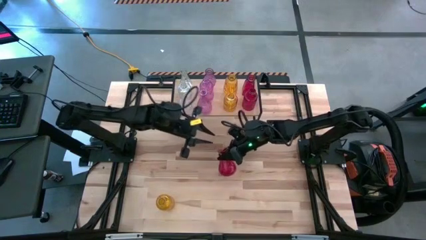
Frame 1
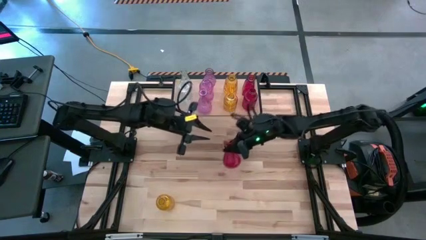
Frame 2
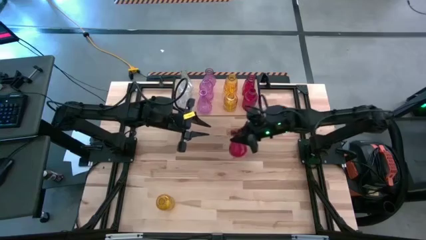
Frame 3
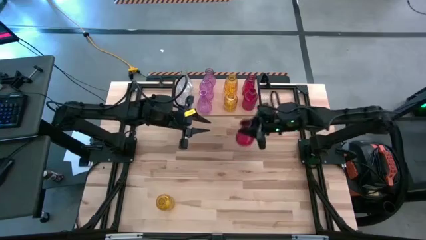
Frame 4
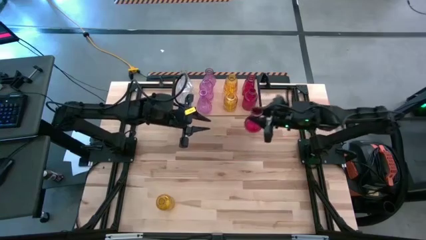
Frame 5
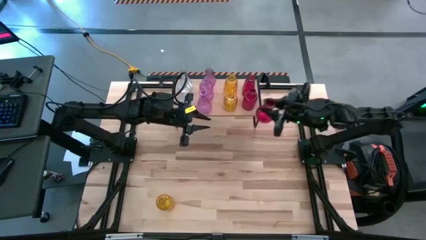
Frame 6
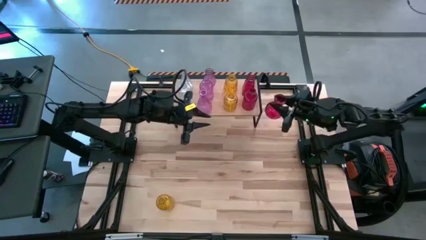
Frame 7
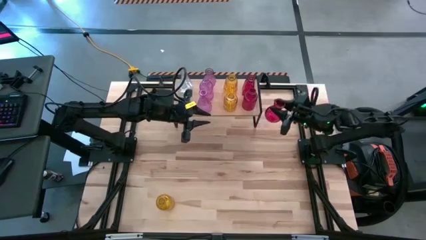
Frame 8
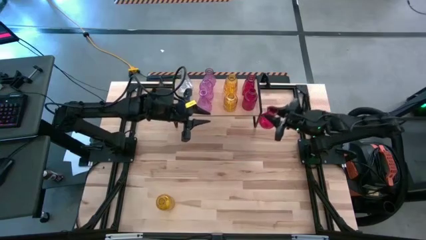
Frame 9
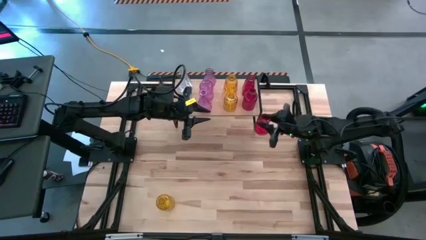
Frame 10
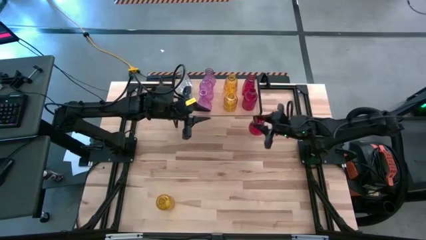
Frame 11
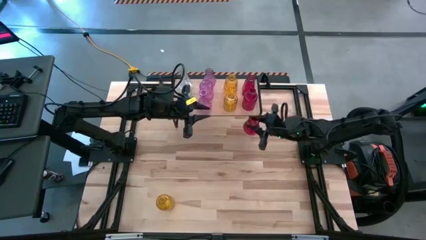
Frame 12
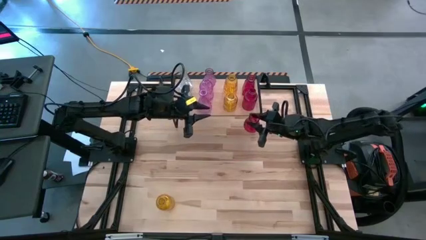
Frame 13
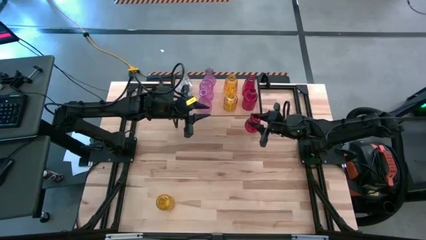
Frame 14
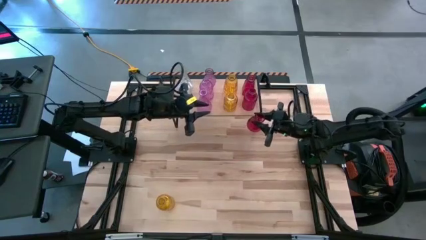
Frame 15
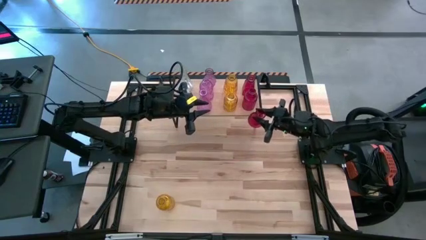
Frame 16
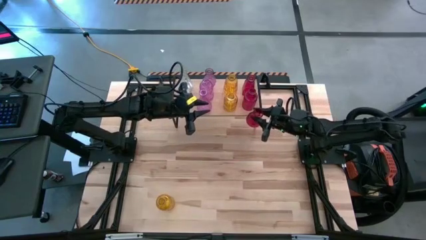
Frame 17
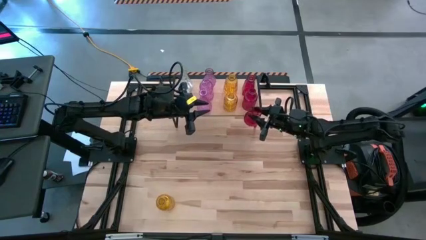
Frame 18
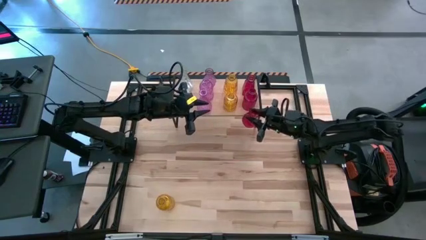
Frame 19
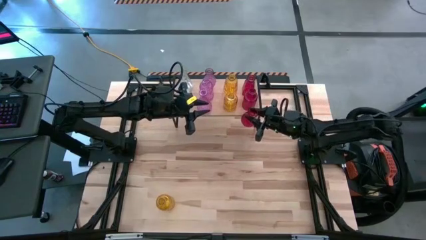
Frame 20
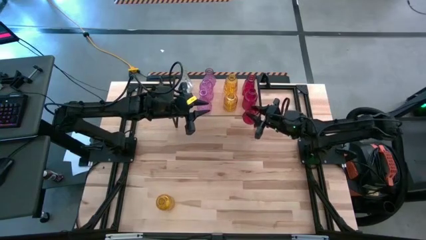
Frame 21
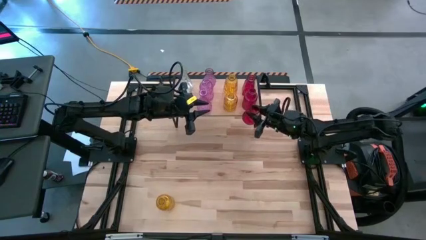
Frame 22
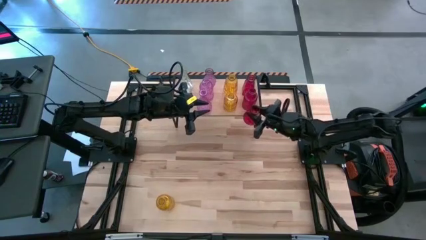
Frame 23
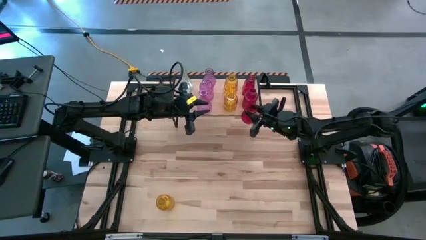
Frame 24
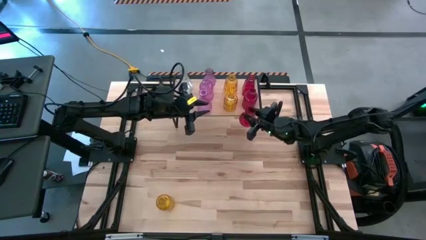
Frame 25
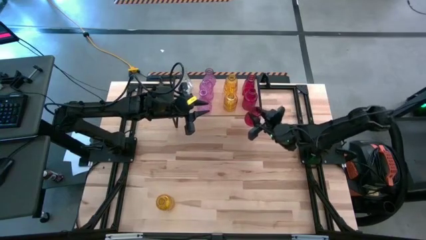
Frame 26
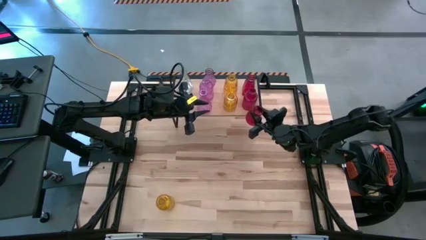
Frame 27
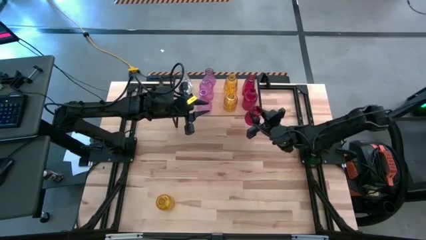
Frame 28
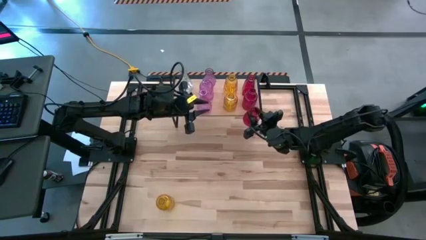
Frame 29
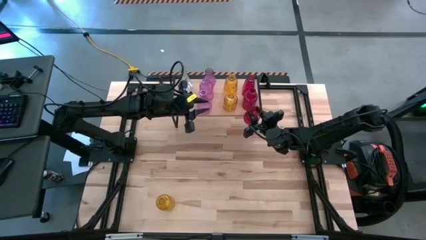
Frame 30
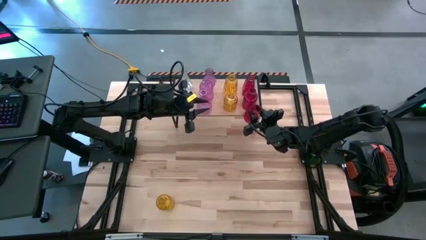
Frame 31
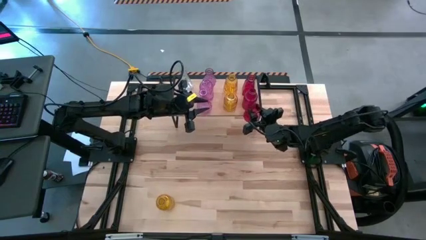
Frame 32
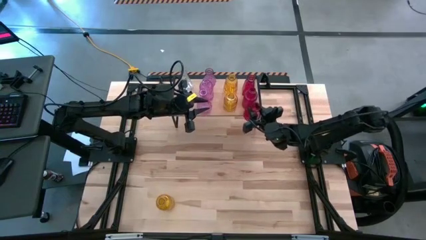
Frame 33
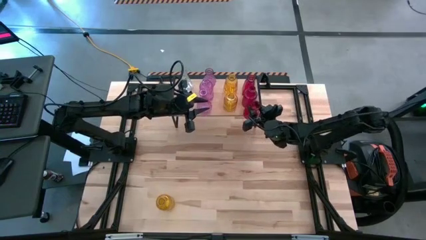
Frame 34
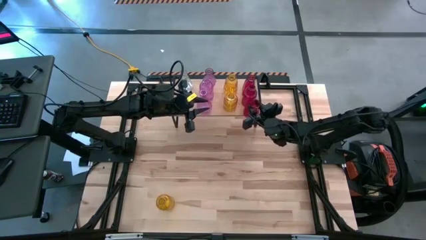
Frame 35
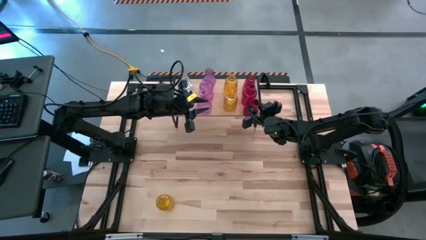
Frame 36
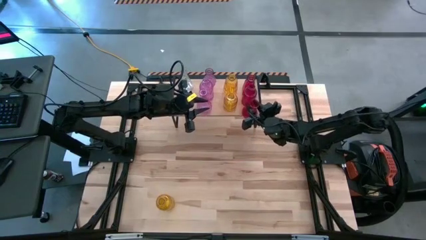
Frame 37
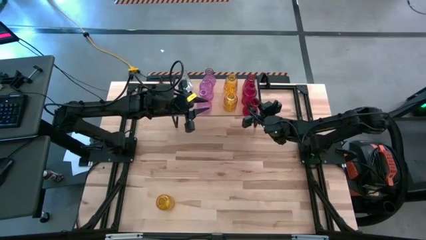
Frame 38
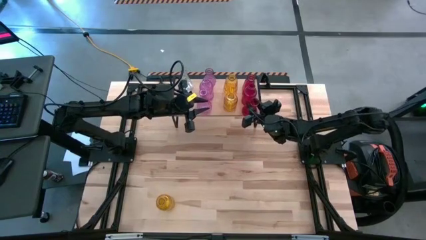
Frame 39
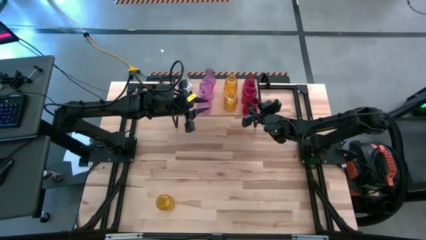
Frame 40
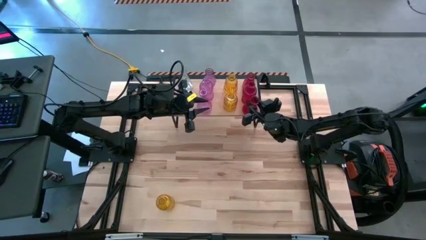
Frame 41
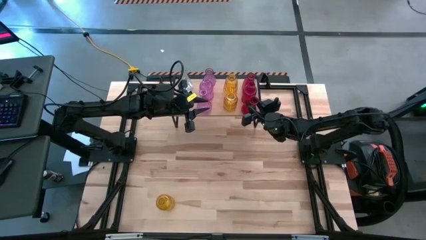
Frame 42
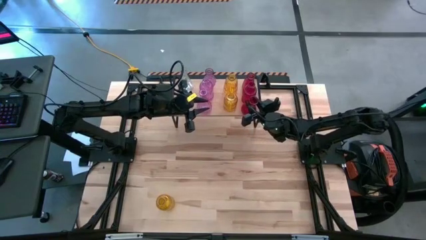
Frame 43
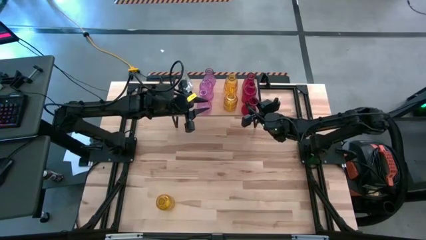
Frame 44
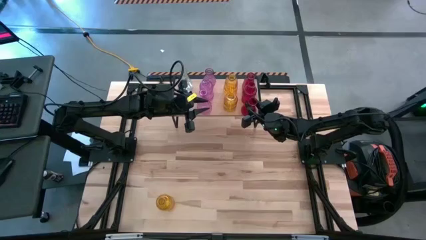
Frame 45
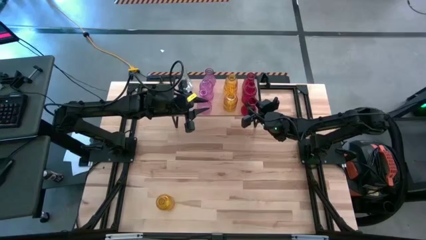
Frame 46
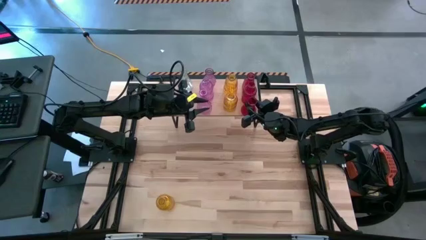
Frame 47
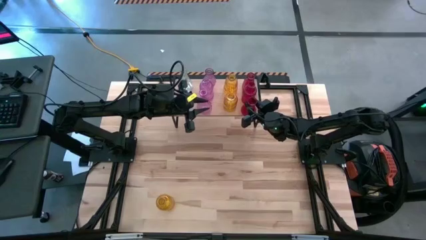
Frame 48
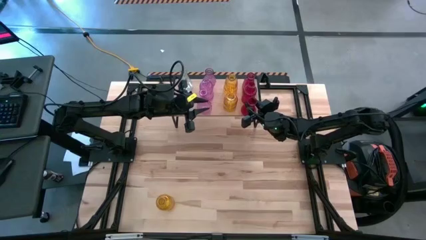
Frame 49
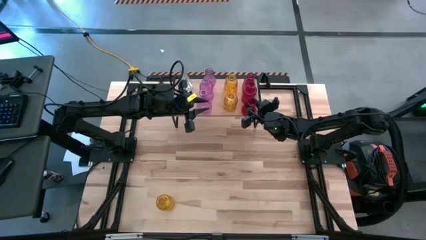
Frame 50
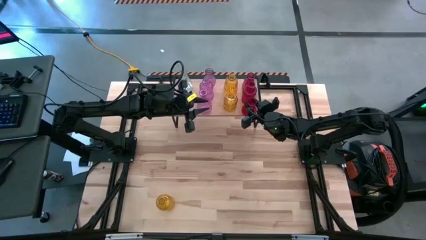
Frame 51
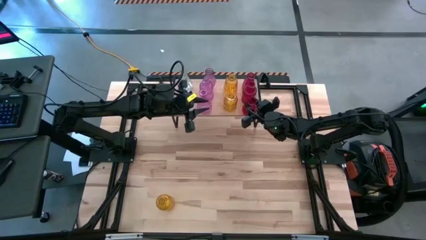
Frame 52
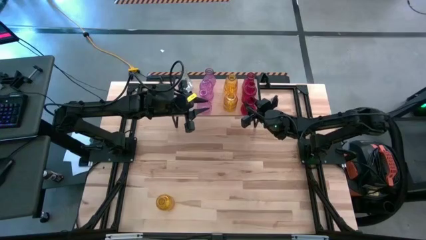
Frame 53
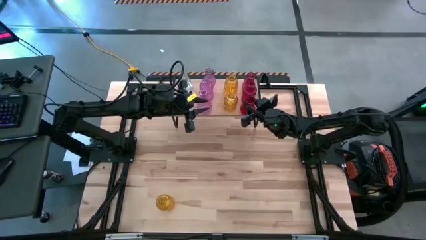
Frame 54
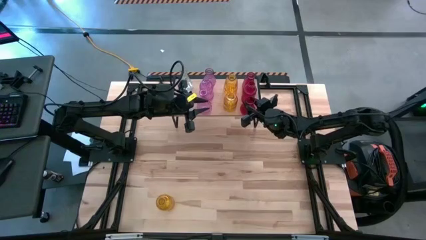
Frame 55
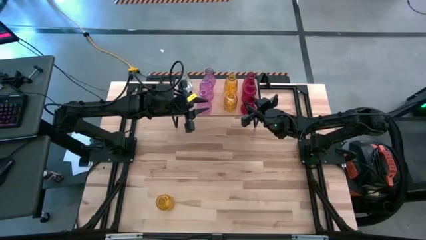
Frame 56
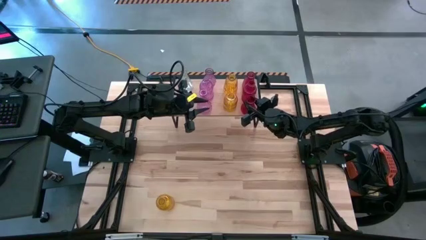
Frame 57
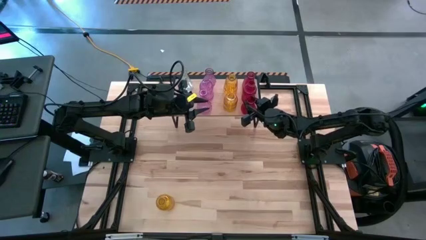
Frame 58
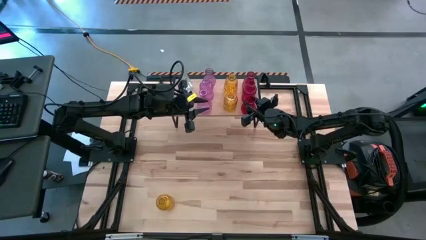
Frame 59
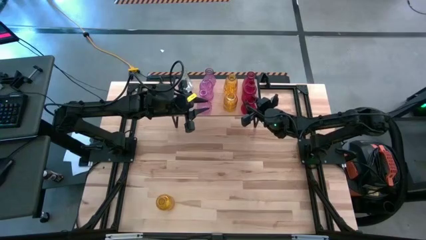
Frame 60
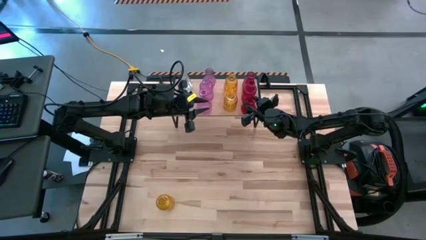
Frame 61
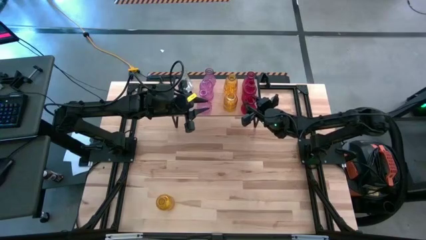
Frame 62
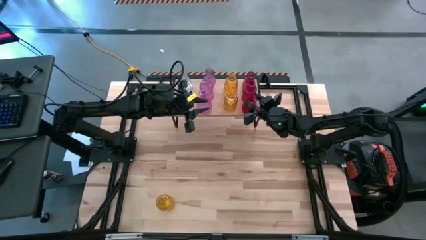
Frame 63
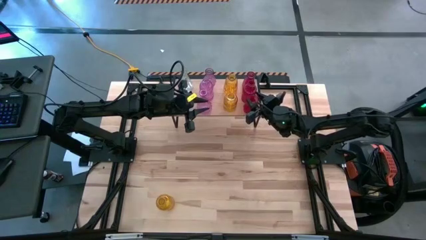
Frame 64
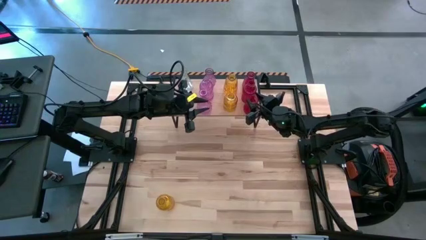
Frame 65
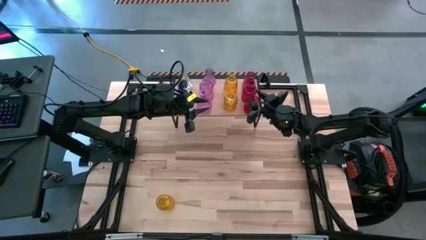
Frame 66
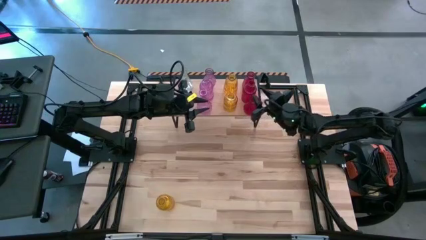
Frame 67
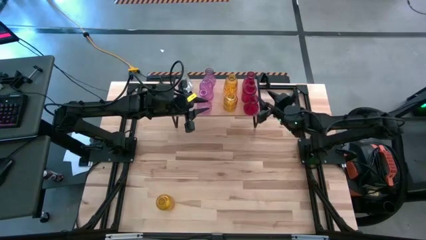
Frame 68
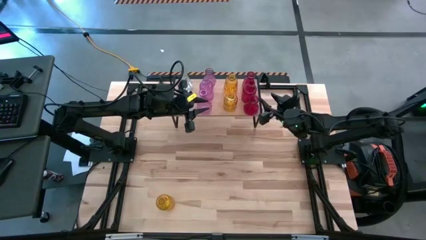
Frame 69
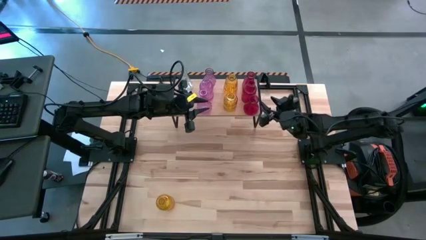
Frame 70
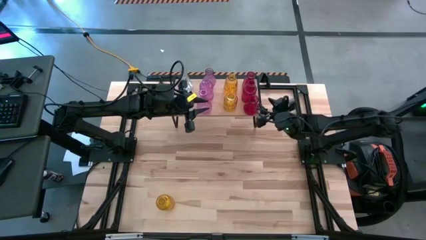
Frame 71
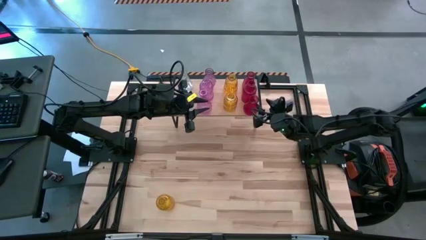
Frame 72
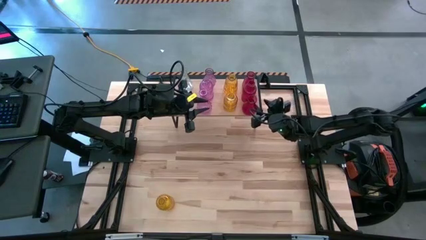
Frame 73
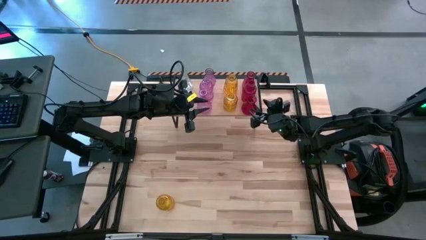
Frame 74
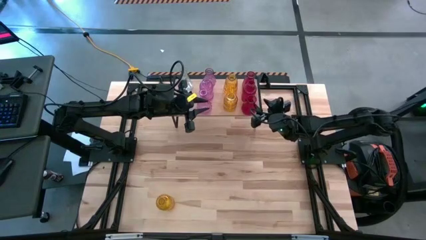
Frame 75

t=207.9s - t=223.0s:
Task: sort vases onto shelf
Put the red vase on the shelf aligned with the other red vase

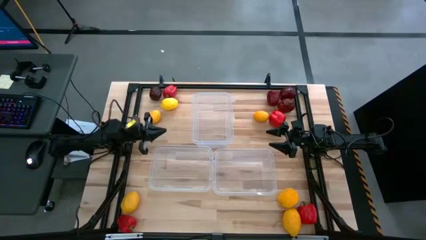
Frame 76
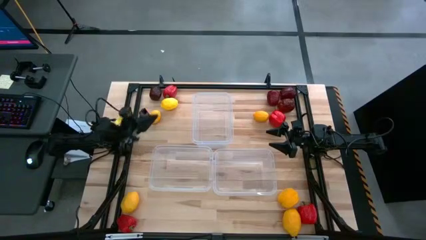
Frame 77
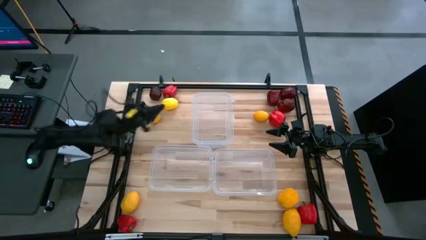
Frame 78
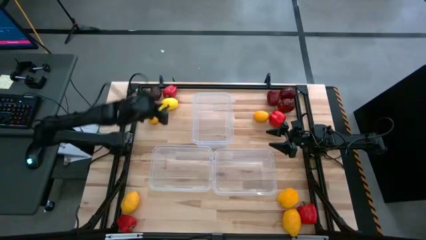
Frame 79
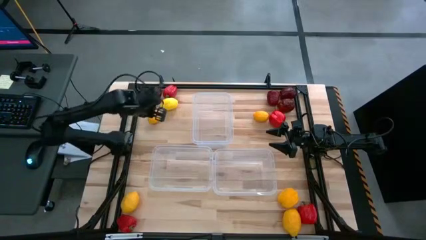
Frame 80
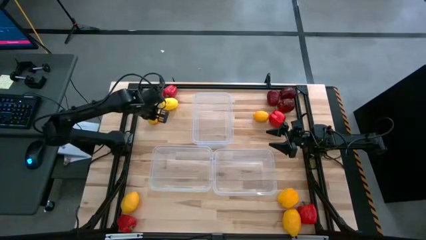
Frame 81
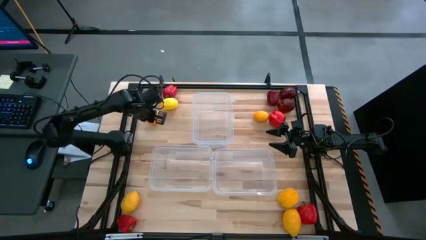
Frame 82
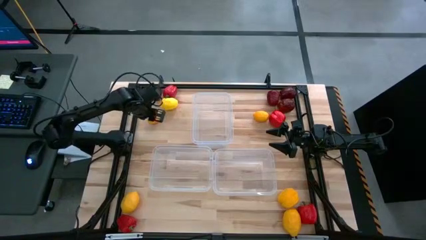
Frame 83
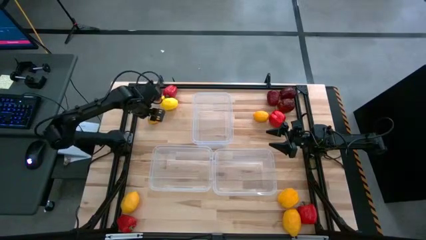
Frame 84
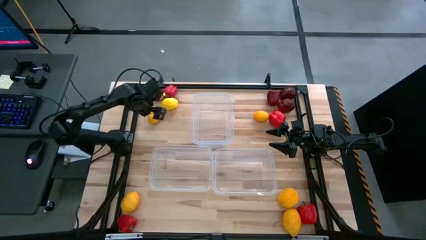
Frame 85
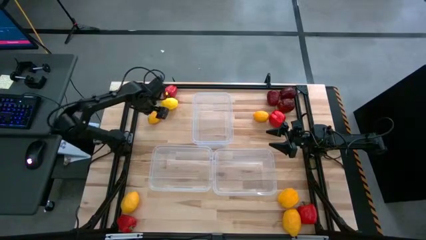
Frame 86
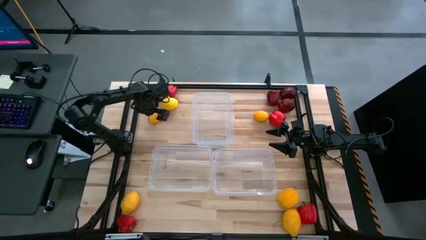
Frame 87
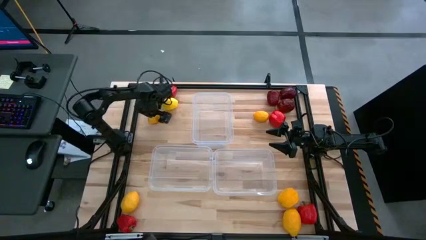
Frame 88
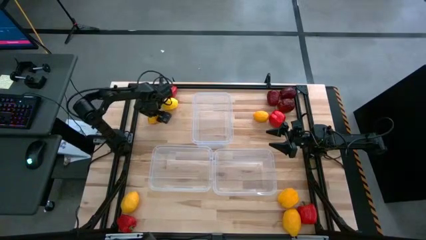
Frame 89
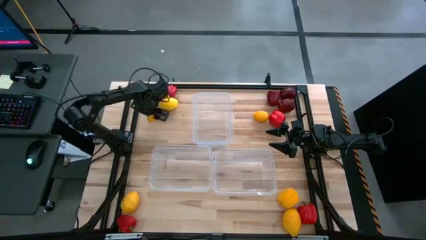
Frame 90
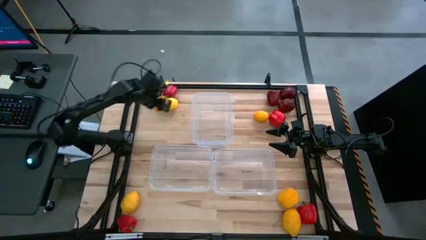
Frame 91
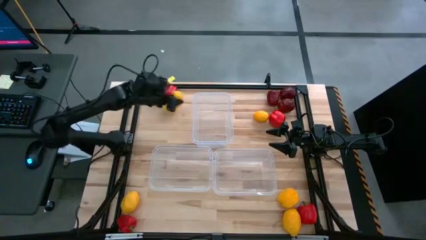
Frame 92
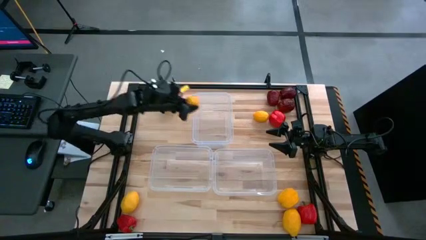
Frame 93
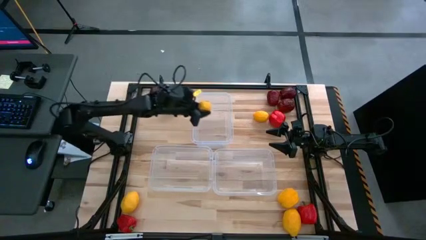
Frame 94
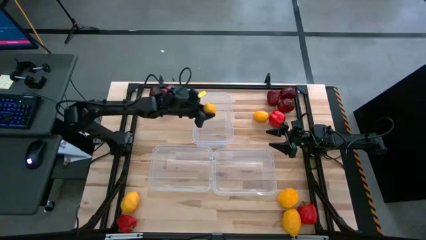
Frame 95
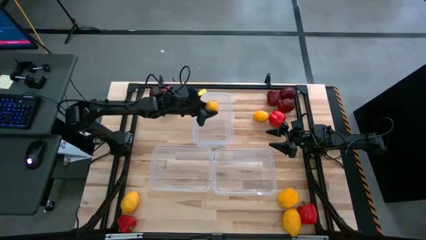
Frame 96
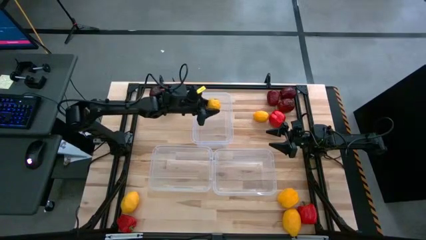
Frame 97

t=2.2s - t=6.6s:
Task: Sort produce into baskets
Put the yellow lemon into the top center transparent bin
